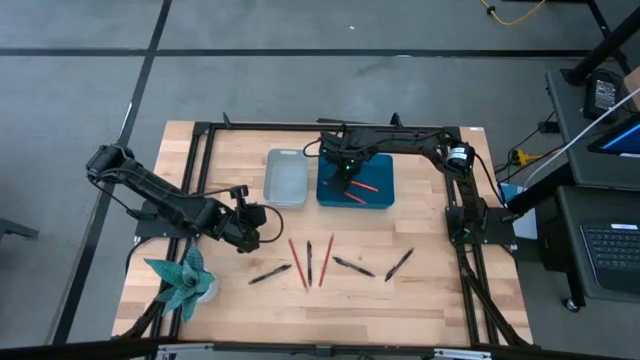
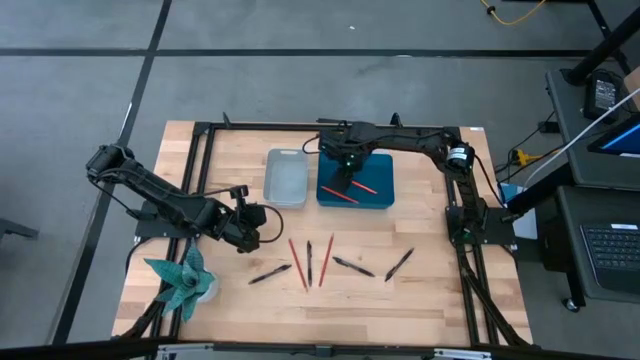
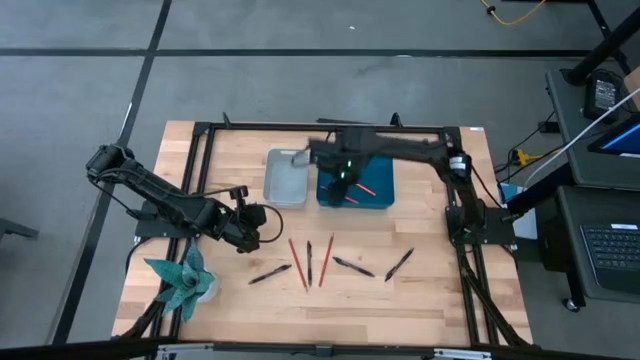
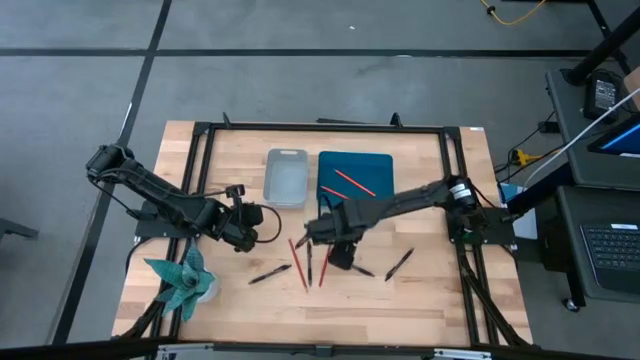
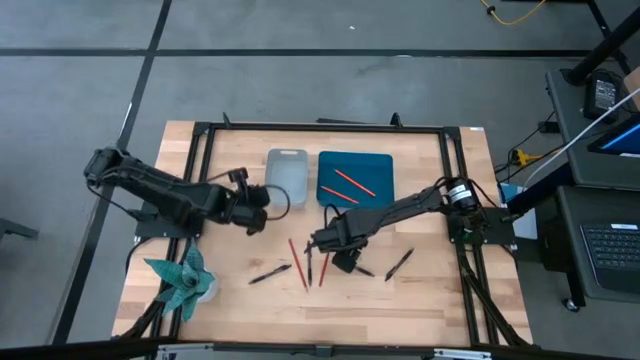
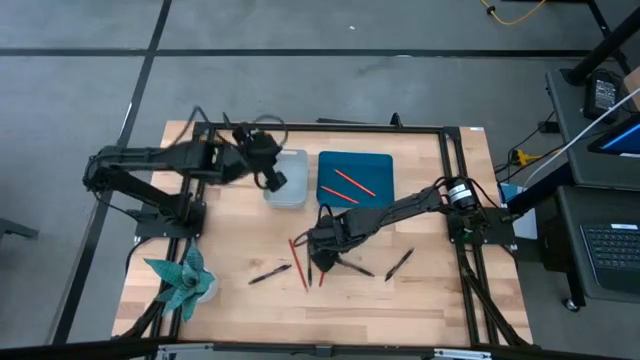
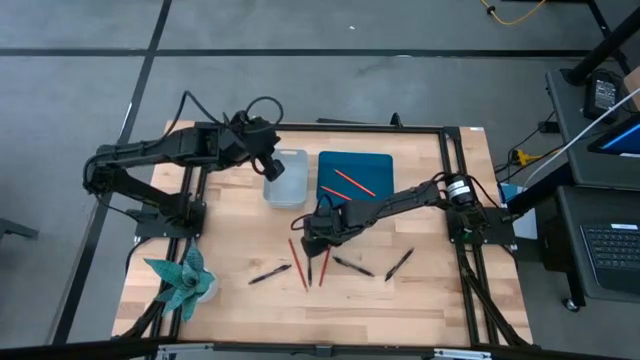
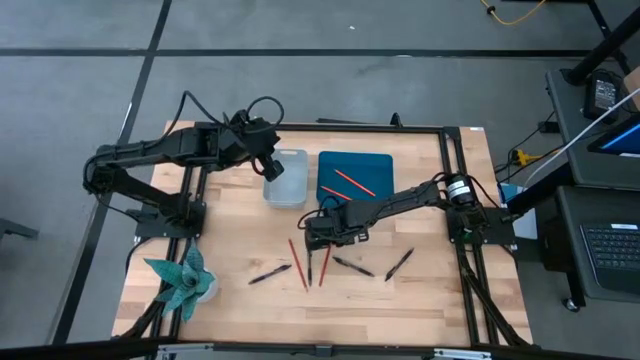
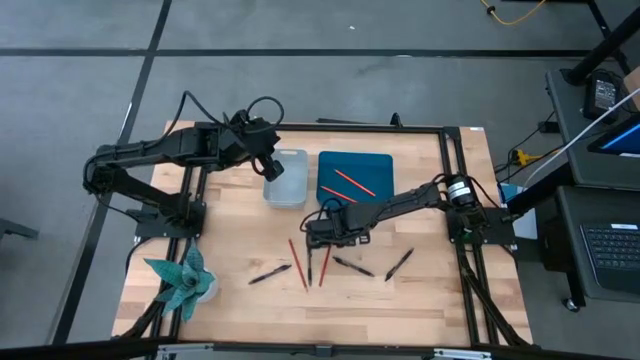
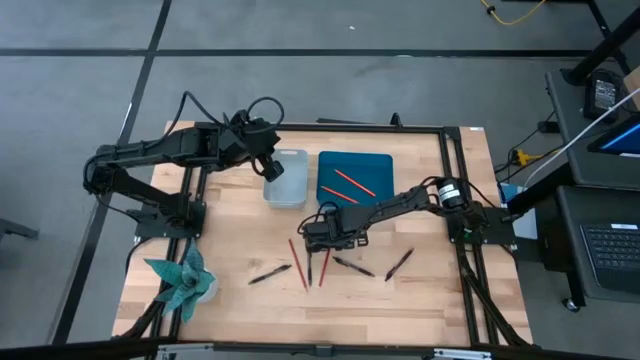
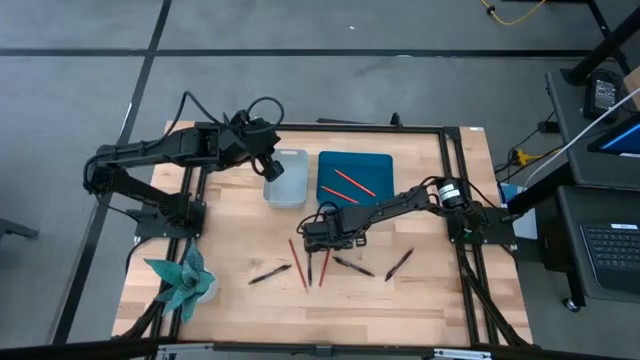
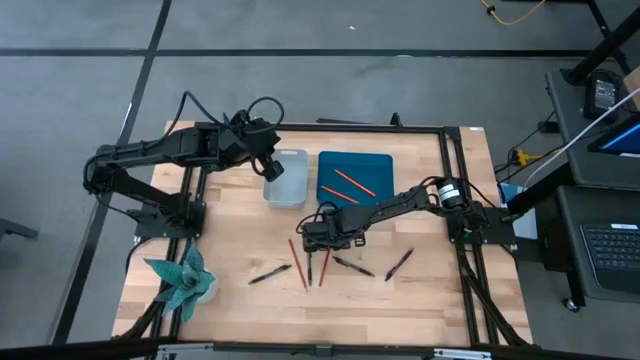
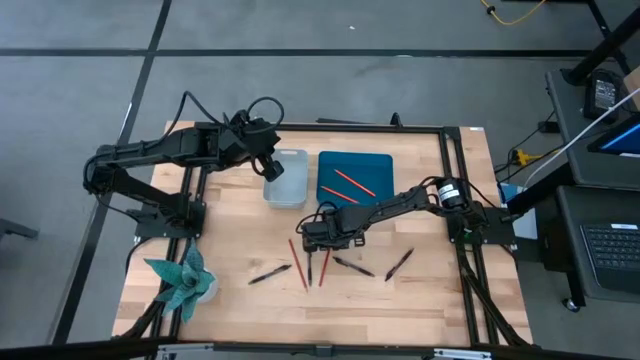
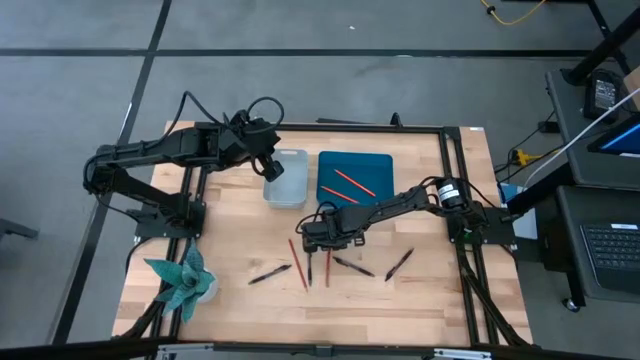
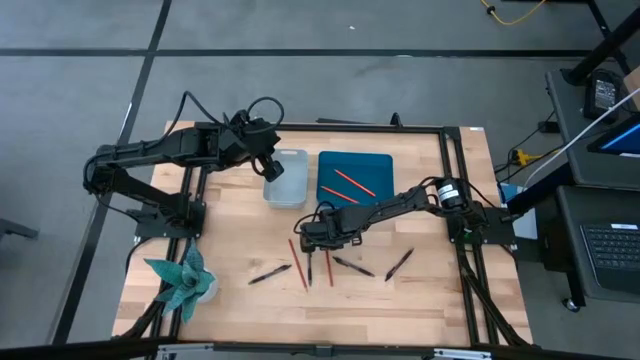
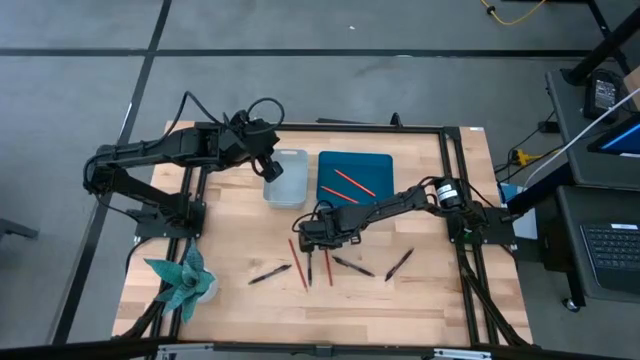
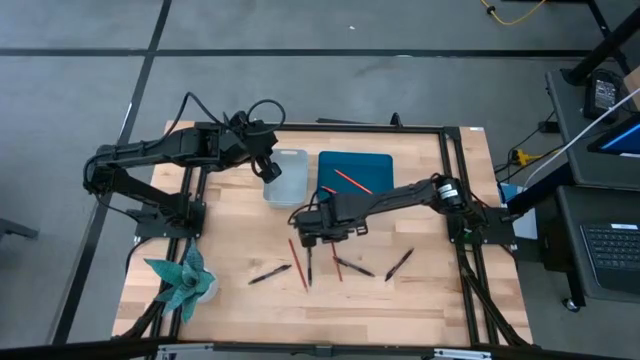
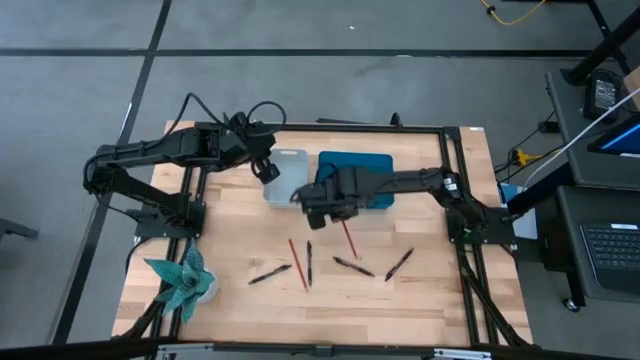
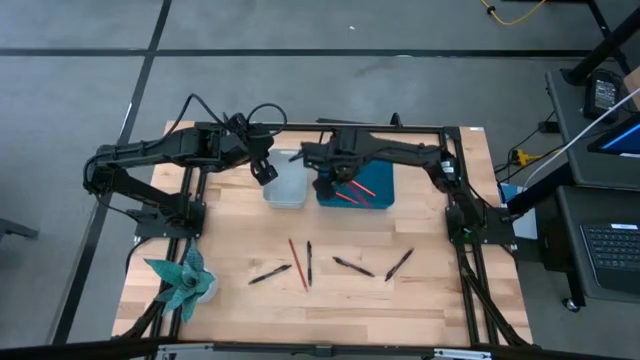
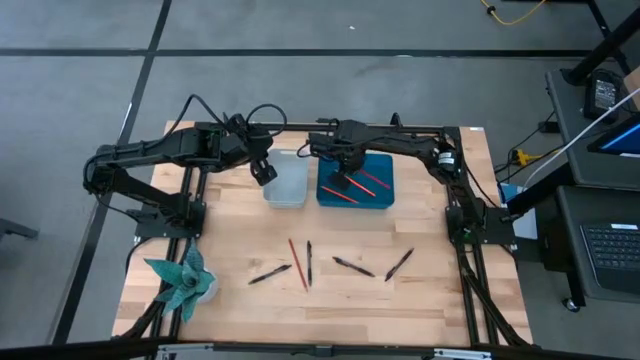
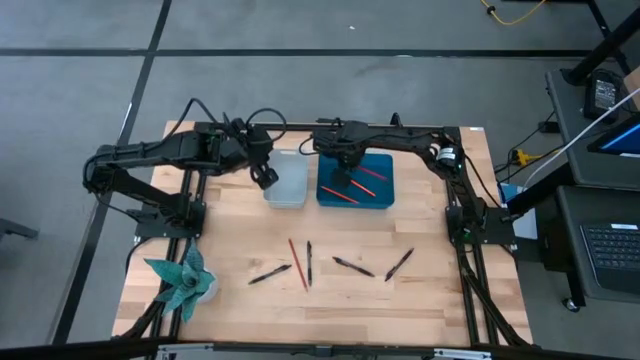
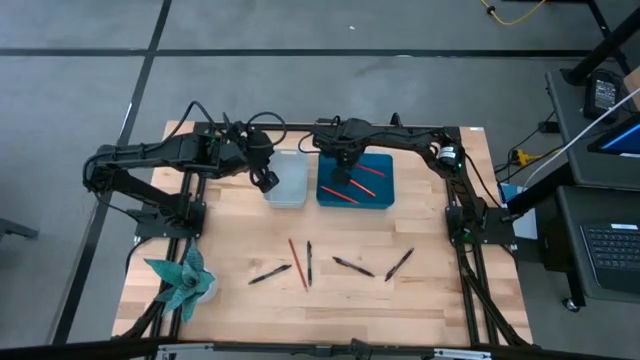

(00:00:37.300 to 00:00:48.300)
Task: Sort pens & pencils
Put the left red pencil into the blue bin

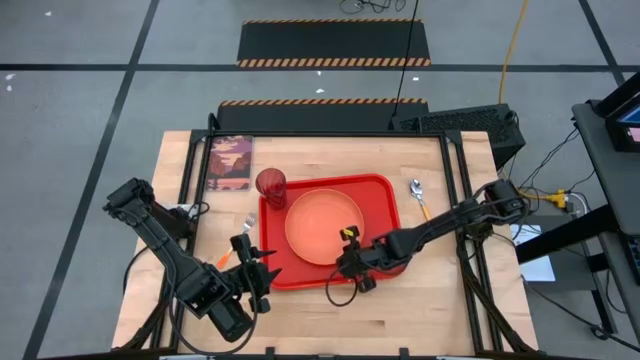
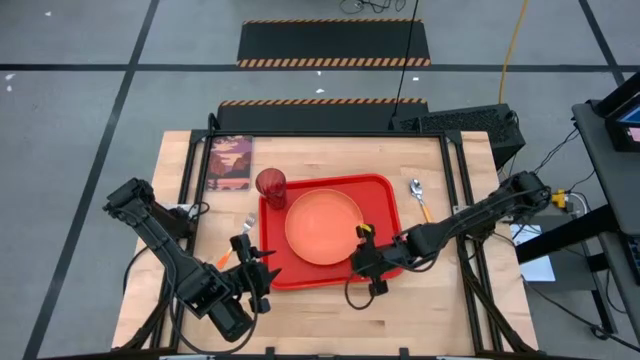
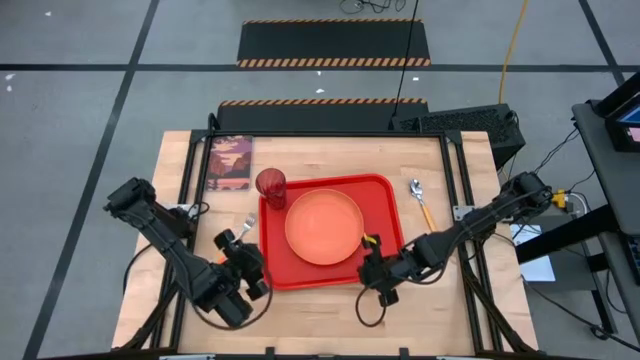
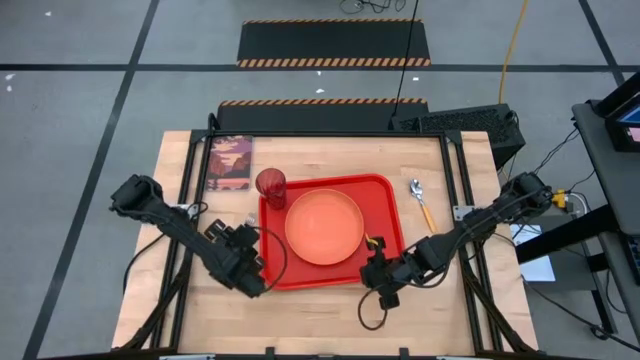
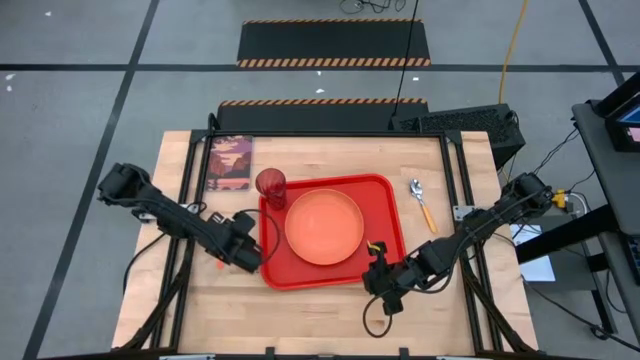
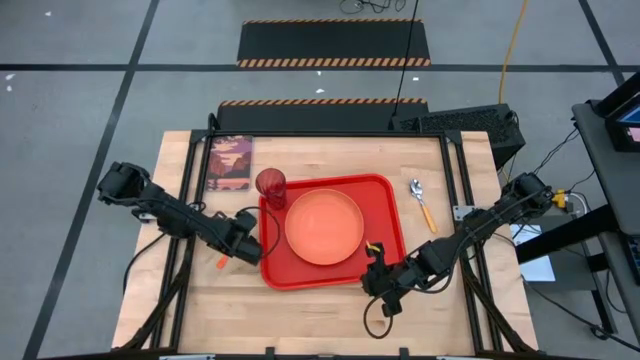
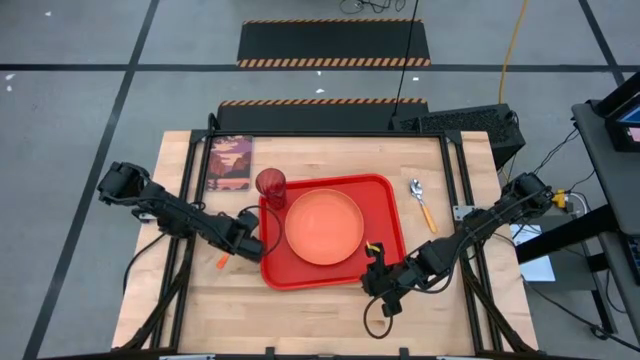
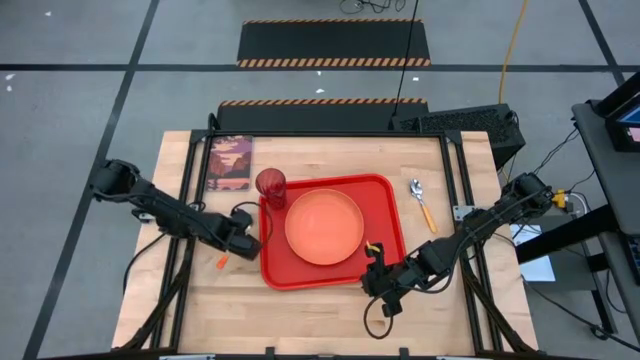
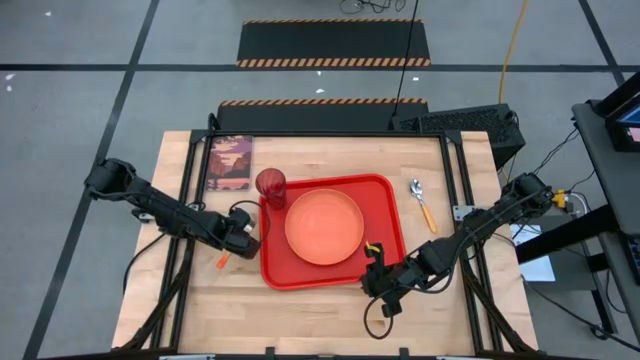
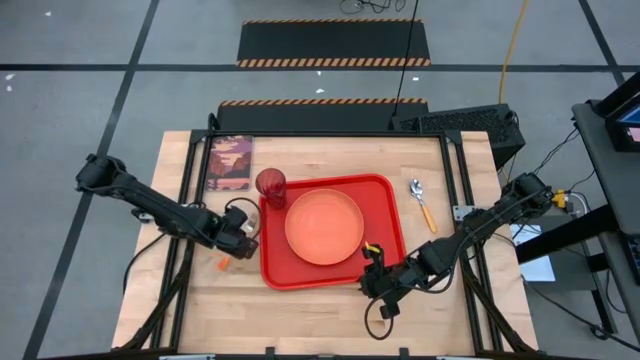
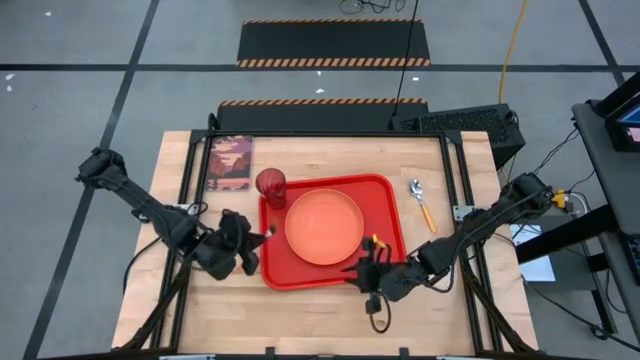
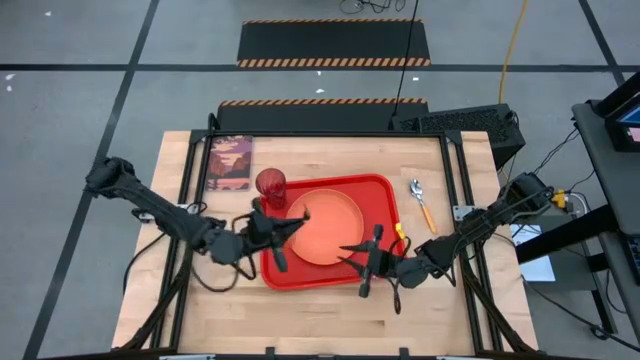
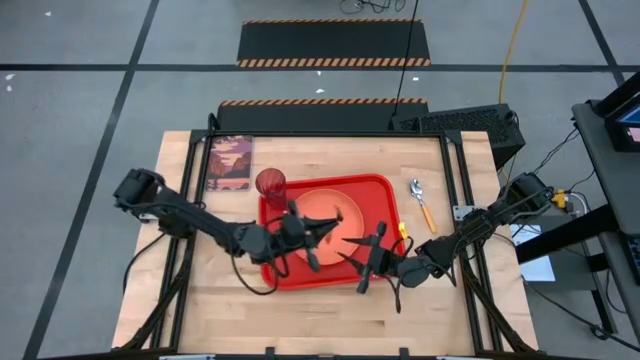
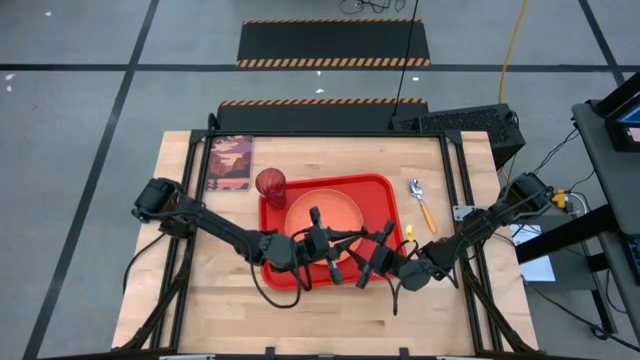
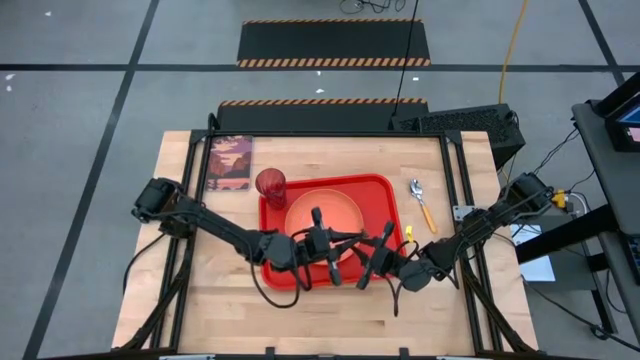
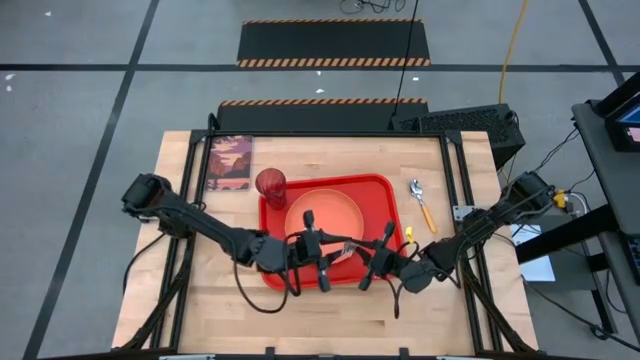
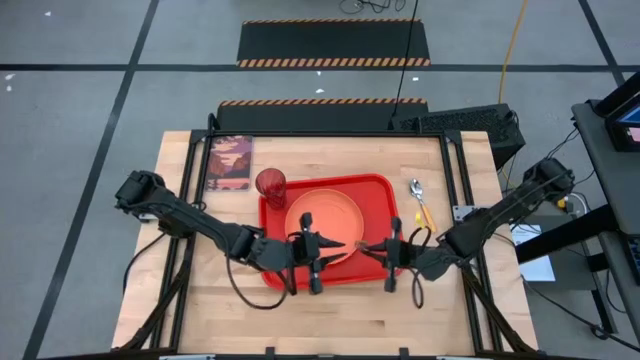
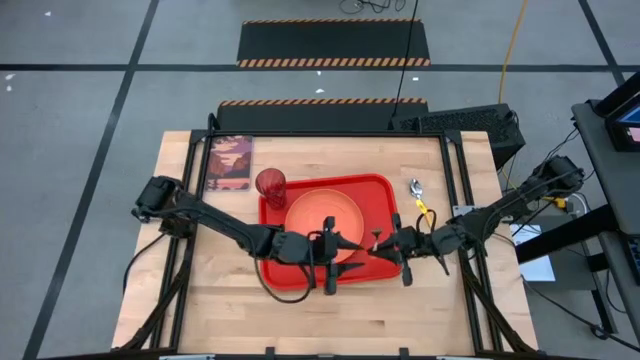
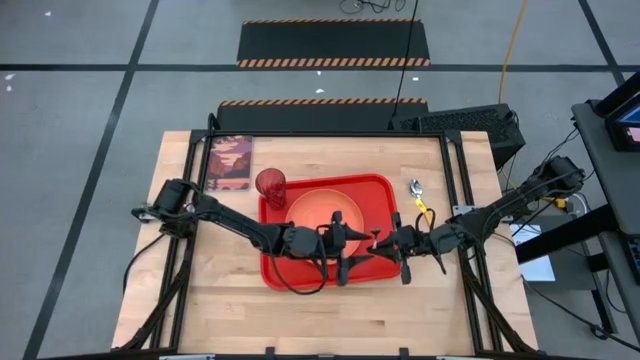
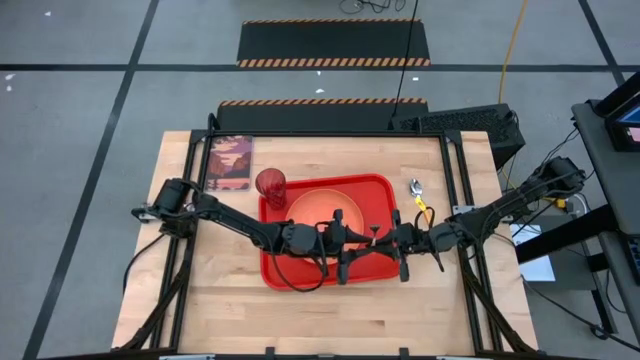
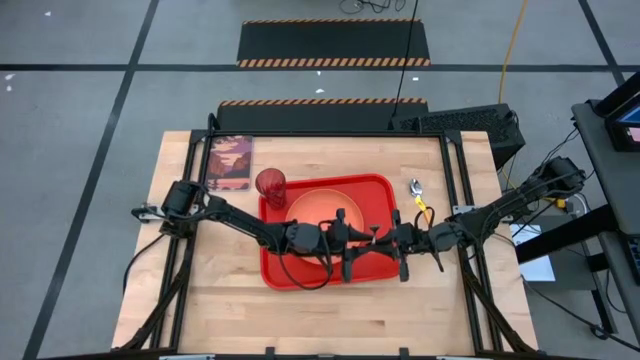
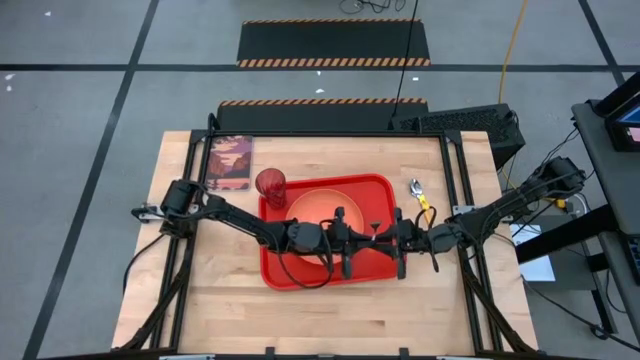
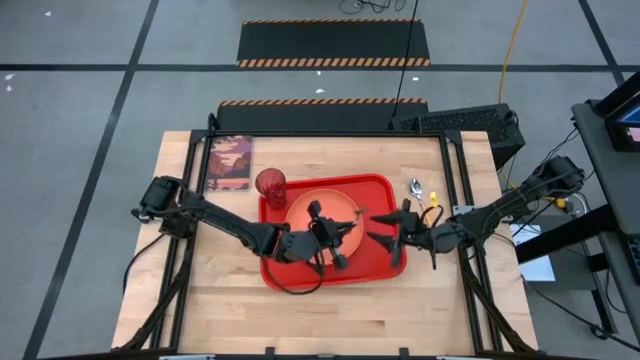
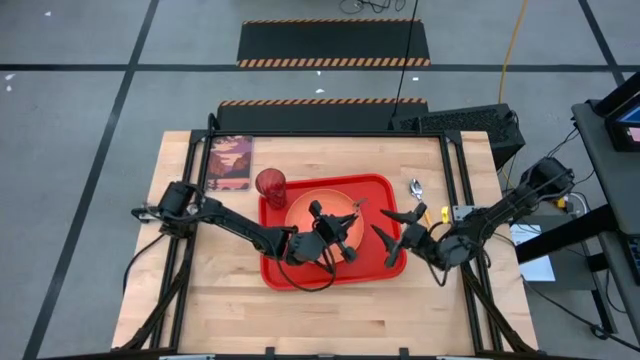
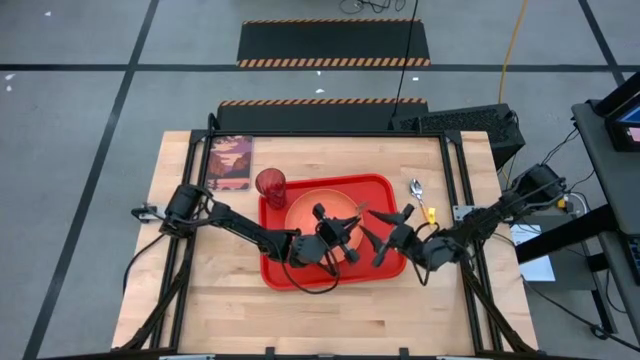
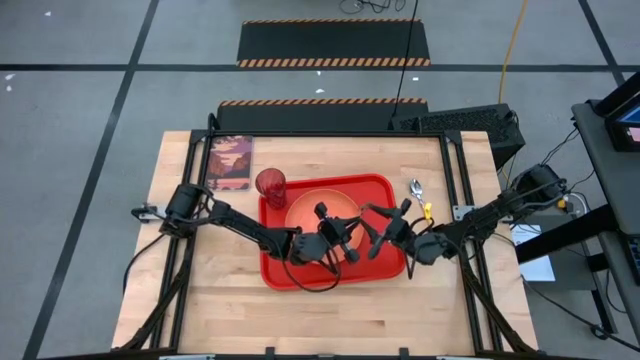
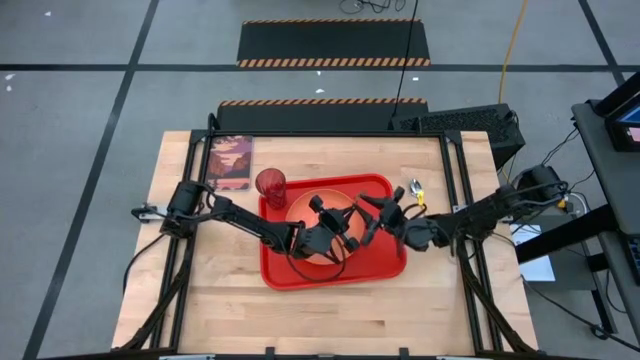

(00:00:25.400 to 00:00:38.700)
Task: Pick and place plate/cup/fork/spoon on tray
Put the white orange fork on the right side of the orange plate
